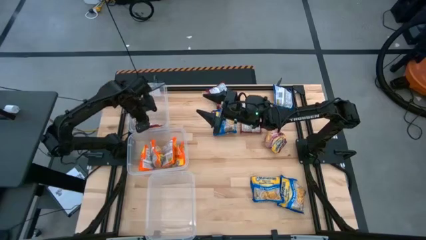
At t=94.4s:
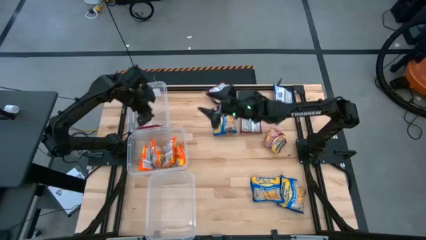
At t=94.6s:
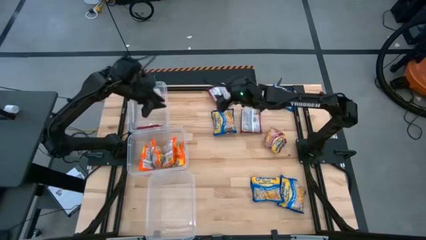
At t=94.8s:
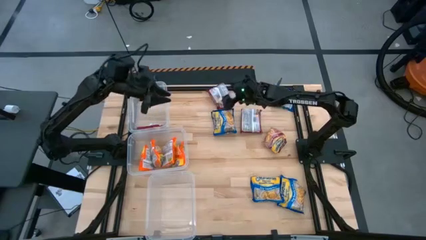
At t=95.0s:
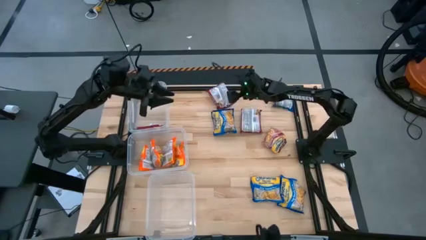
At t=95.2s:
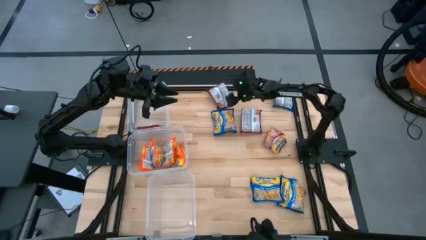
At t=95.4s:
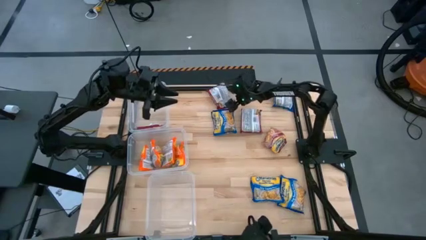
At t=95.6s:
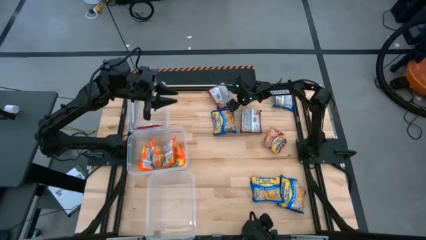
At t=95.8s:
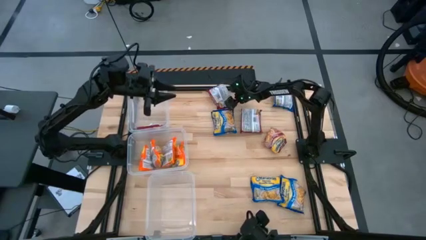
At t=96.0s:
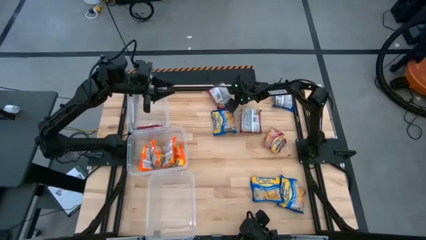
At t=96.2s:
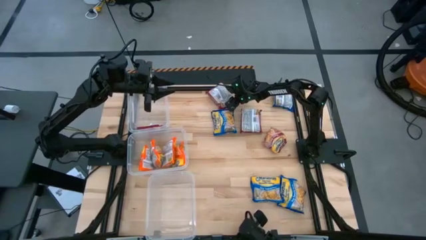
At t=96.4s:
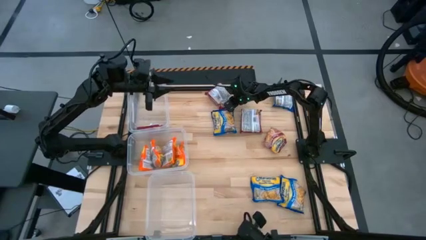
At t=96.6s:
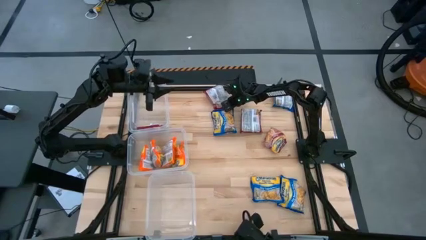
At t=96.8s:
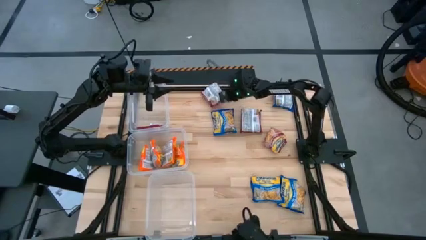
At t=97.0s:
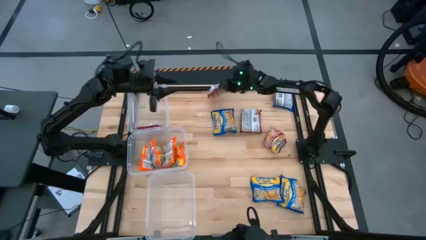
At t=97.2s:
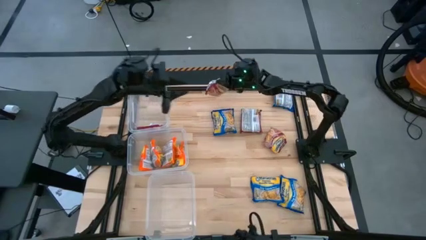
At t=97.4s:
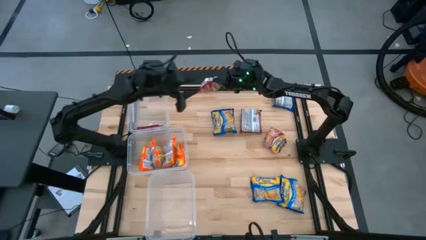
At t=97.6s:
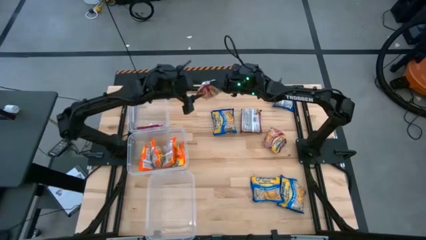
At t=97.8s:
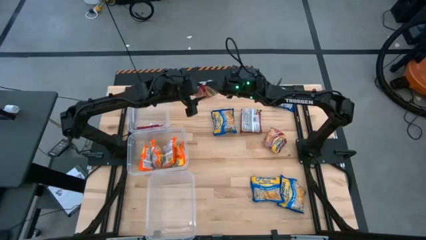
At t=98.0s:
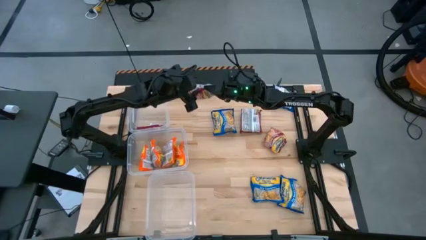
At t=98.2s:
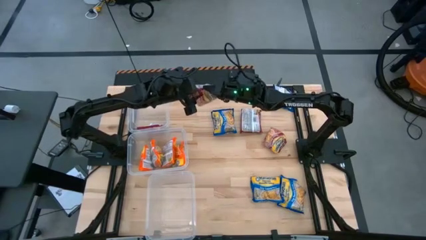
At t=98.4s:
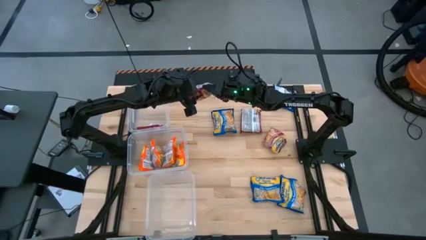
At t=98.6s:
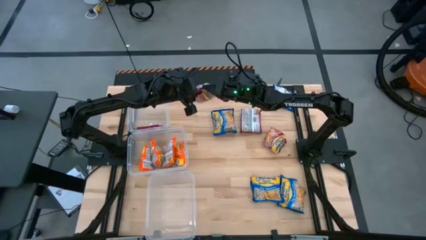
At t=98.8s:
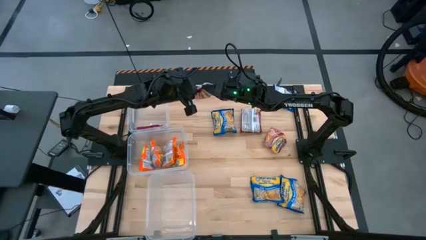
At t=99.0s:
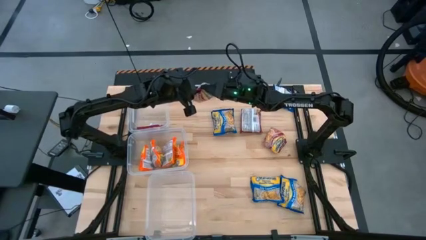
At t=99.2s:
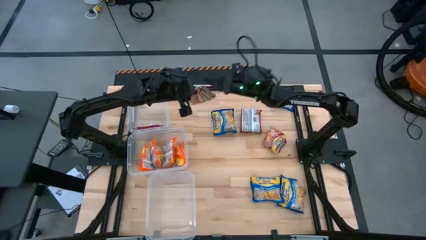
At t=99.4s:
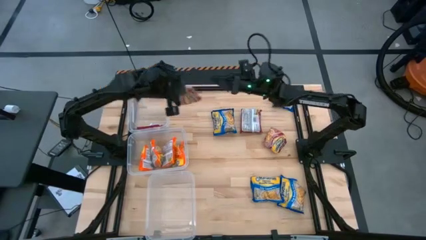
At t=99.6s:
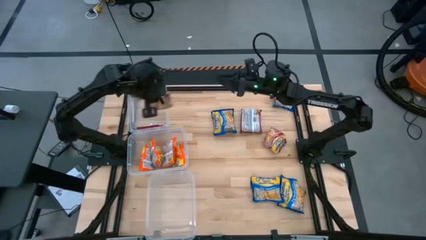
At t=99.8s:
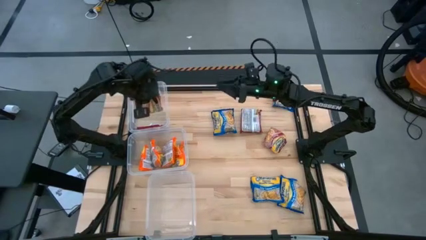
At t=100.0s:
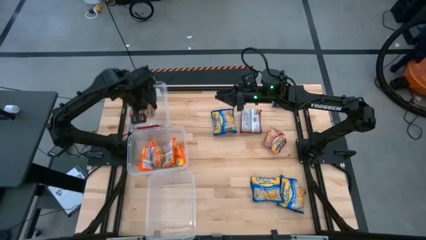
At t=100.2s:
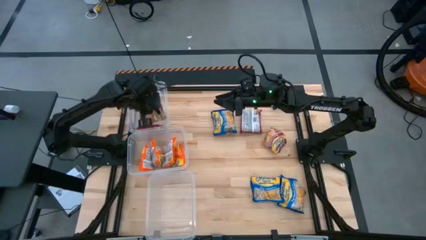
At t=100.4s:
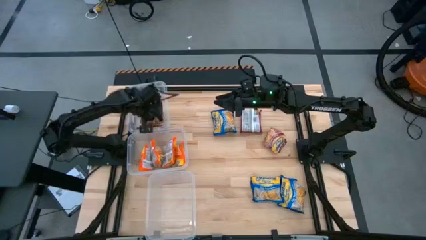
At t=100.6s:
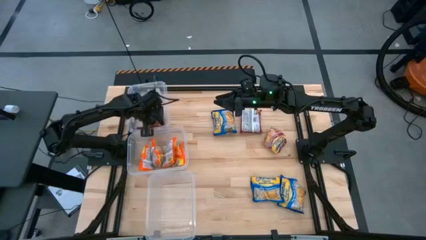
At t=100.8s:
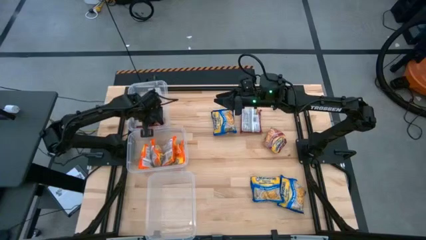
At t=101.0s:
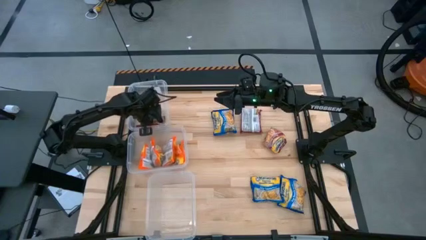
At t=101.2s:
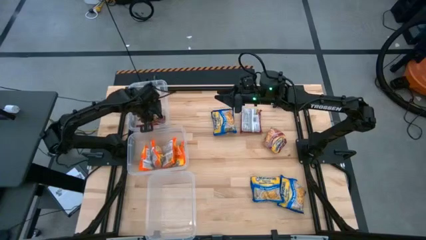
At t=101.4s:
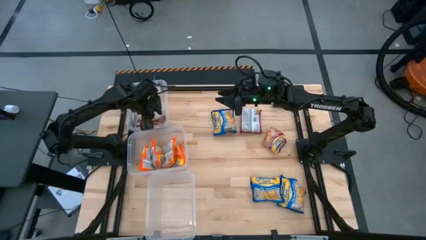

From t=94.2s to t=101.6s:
Task: Sort Maruchan noodles
Put the red noodle pack into the top transparent bin

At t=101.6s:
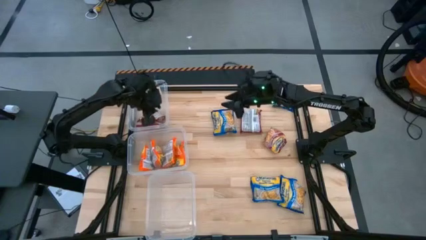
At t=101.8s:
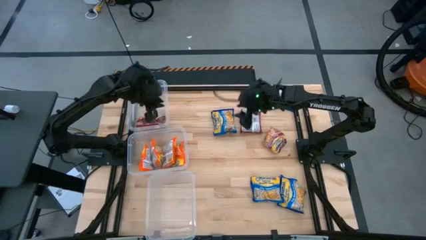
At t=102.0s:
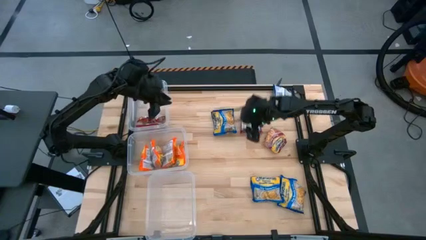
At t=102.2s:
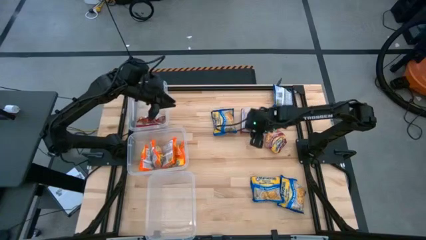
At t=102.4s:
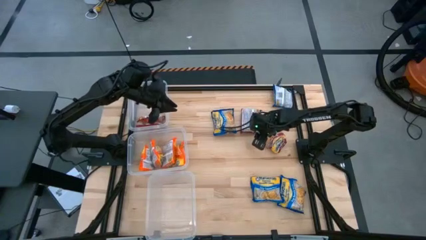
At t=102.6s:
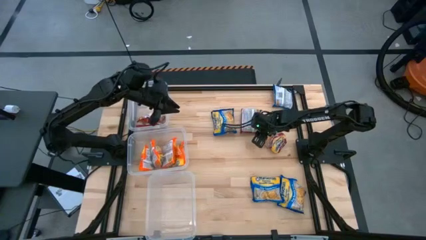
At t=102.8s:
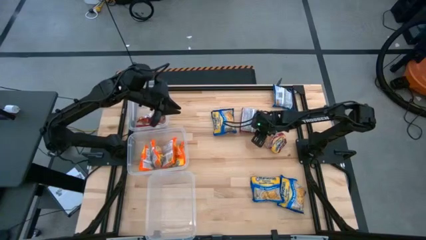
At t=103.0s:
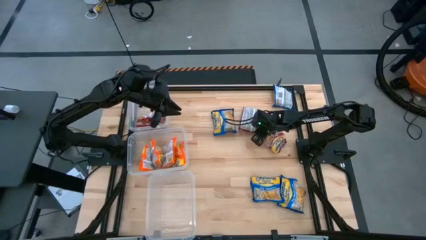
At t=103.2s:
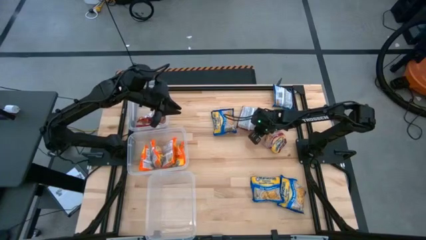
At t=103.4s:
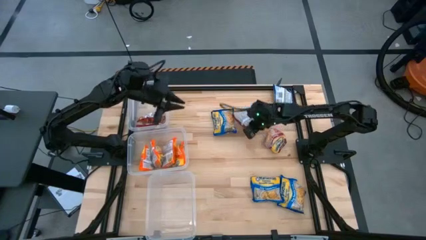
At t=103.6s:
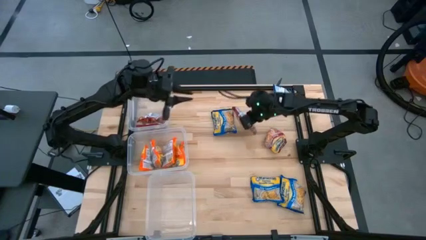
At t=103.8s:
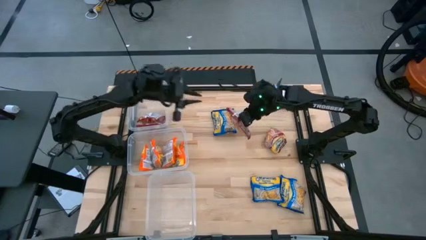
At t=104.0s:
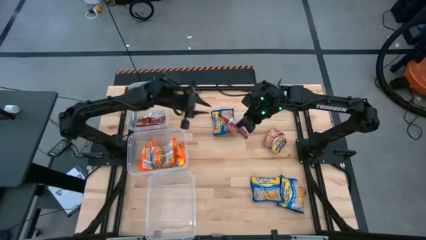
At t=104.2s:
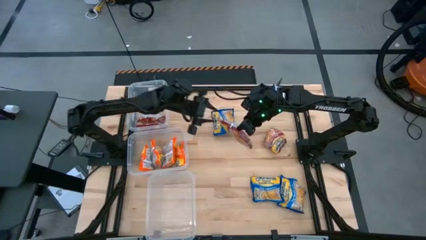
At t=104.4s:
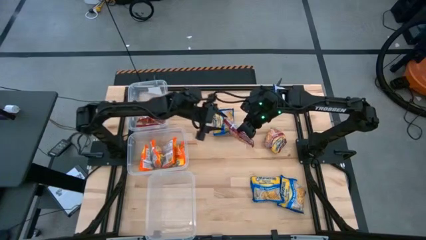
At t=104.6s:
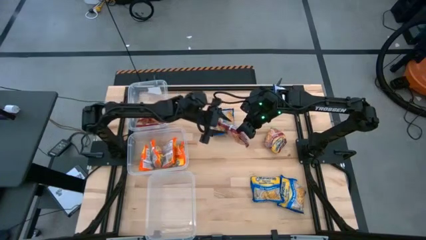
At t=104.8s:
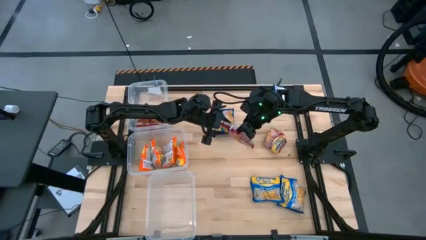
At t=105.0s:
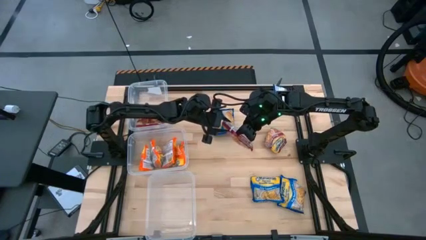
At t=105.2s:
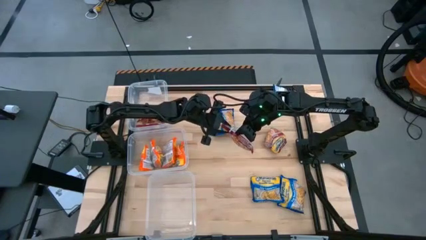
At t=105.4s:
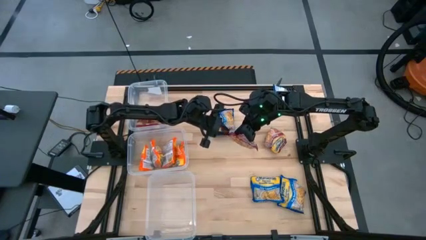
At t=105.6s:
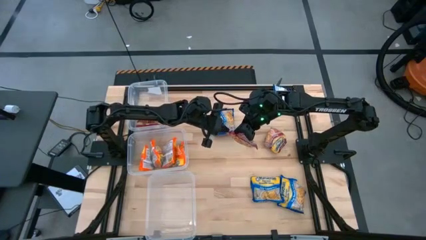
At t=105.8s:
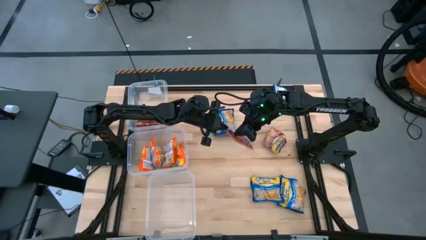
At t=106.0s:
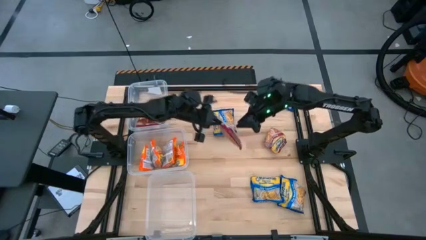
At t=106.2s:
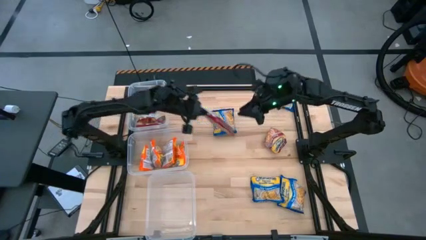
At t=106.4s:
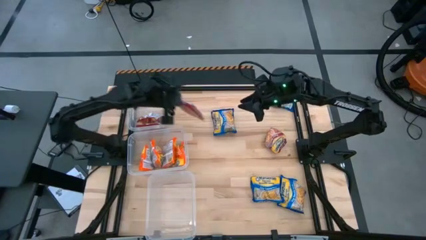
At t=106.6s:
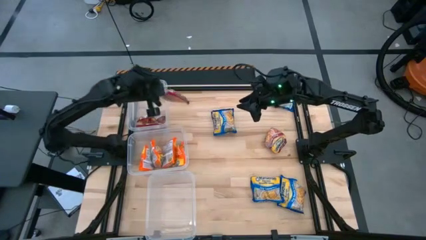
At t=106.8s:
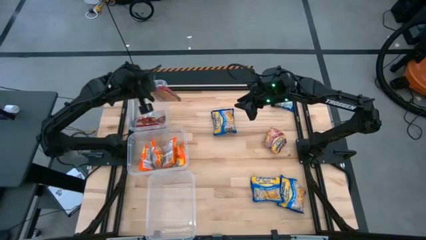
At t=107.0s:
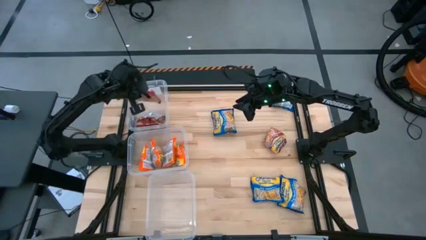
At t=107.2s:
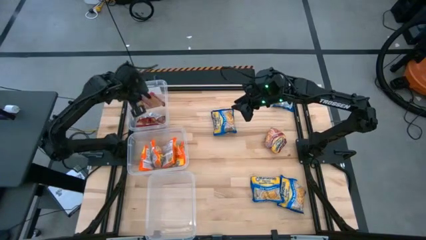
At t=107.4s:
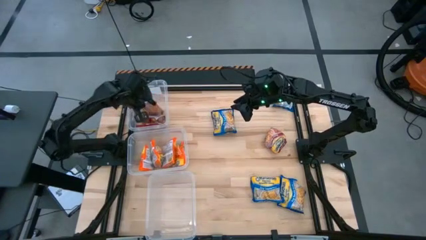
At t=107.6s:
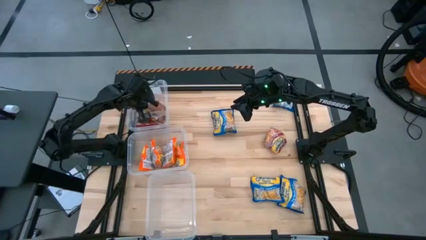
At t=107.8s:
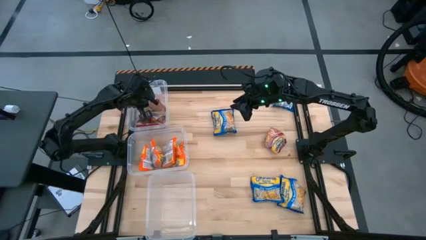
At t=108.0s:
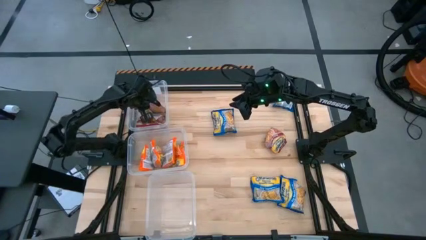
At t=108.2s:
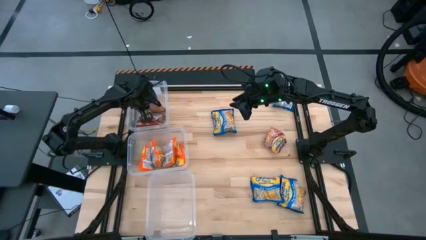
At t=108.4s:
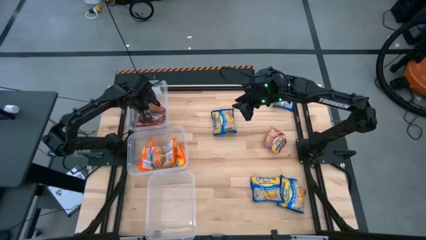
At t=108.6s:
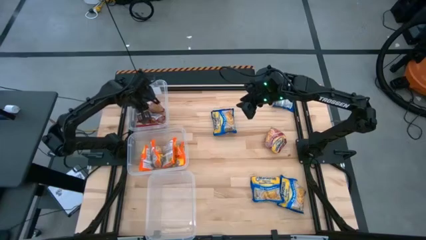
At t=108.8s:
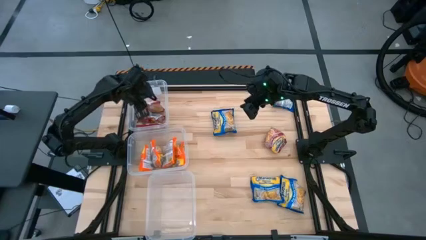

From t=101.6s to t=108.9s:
Put the red noodle pack into the top transparent bin

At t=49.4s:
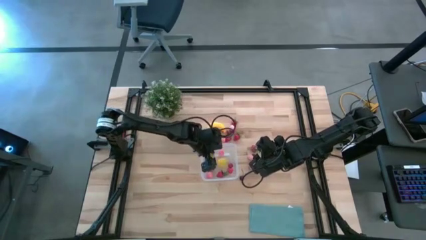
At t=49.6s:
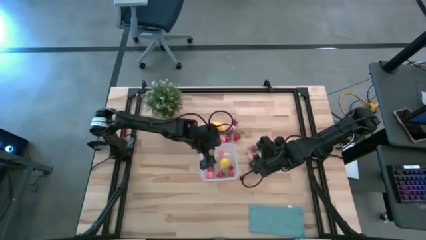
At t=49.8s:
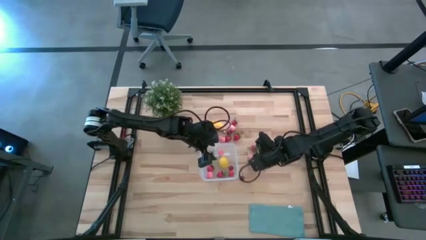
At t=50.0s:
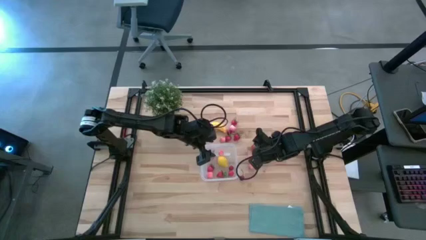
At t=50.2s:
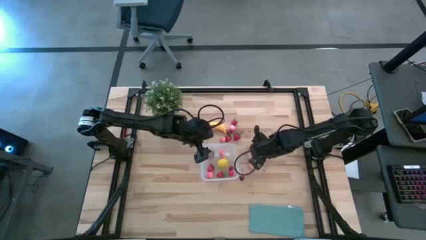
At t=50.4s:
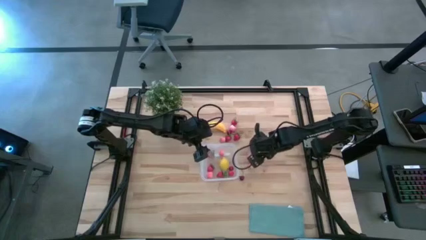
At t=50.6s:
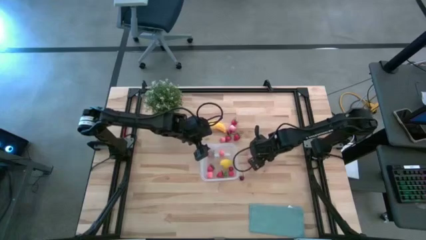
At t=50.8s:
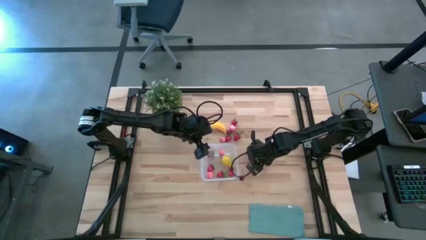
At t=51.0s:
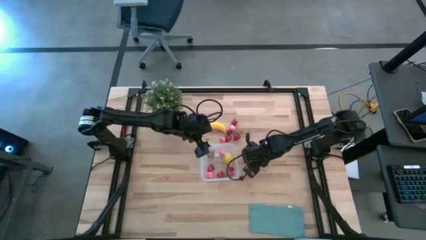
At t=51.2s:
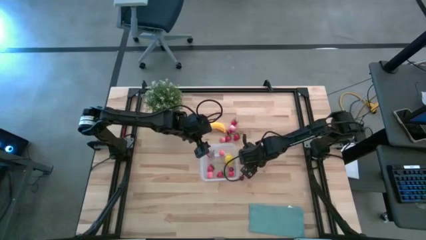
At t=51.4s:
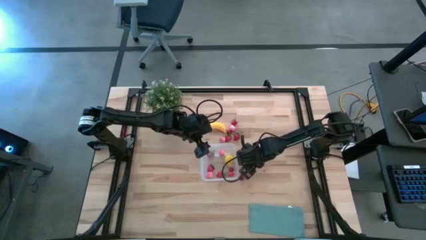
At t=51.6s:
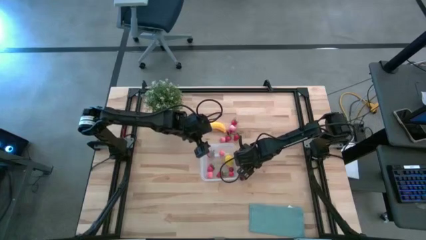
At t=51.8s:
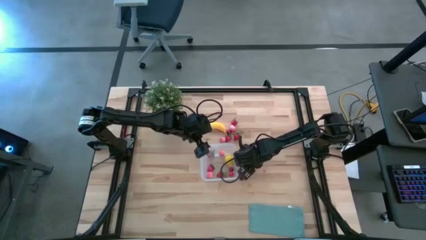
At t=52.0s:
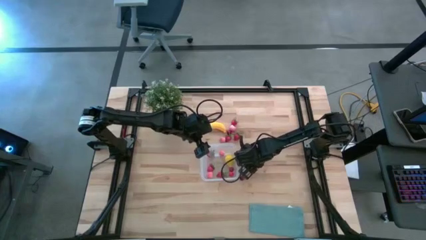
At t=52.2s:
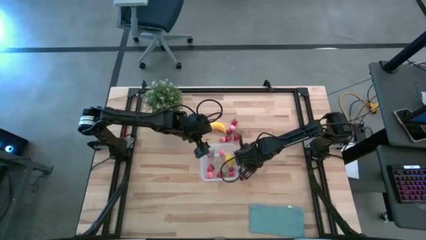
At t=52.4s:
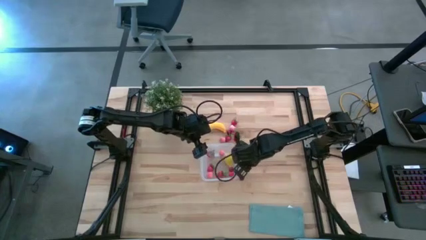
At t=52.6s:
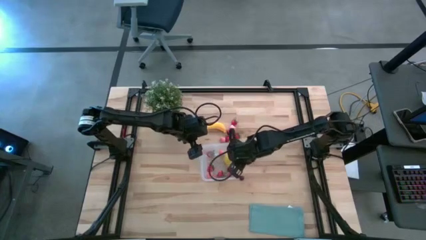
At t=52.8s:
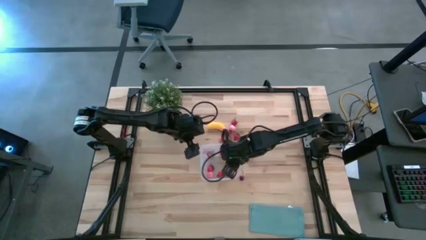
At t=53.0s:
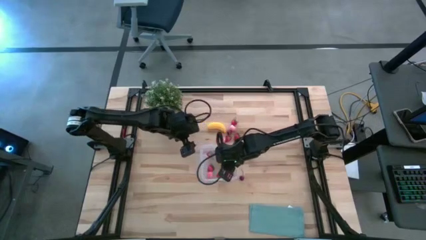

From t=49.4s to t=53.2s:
Task: Pick and placing Produce into tupperware
Put the pink peach into the transparent container
